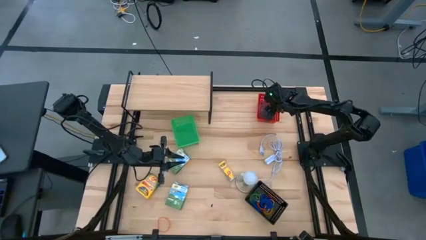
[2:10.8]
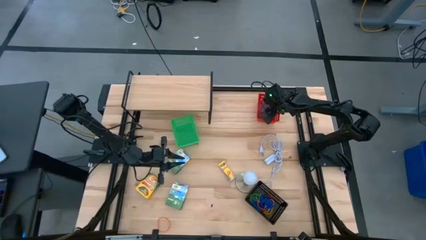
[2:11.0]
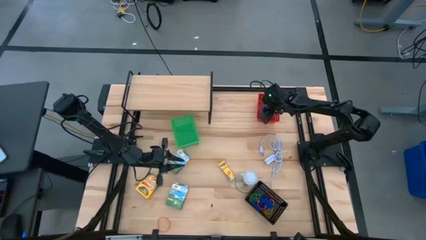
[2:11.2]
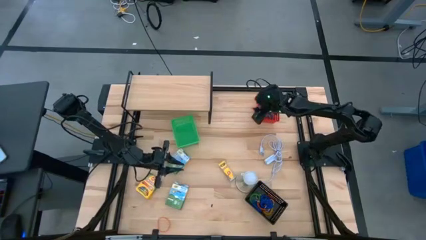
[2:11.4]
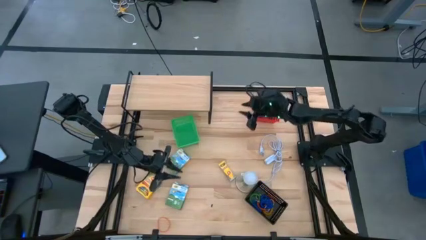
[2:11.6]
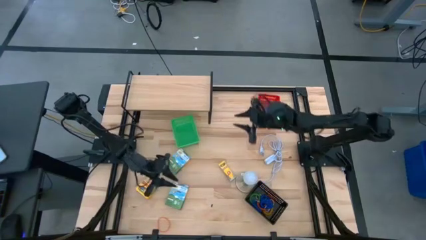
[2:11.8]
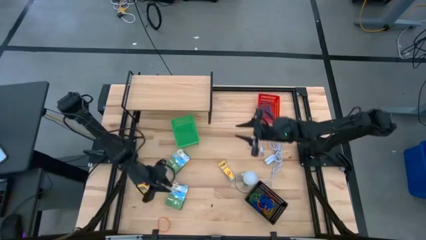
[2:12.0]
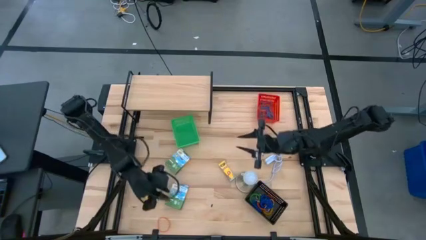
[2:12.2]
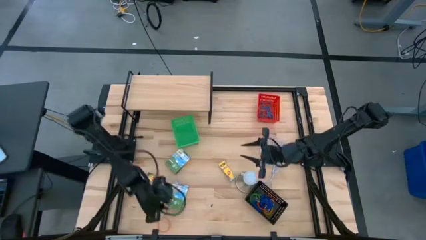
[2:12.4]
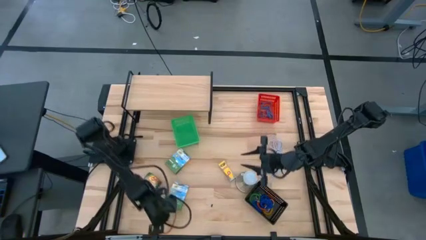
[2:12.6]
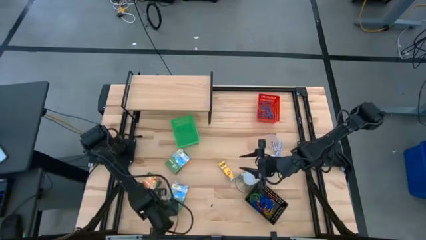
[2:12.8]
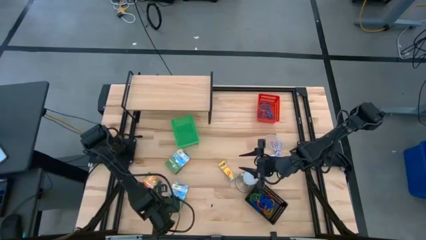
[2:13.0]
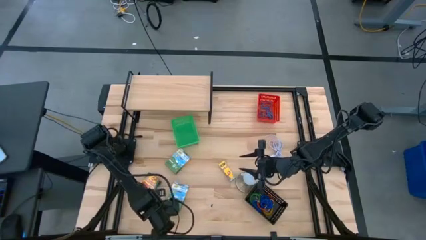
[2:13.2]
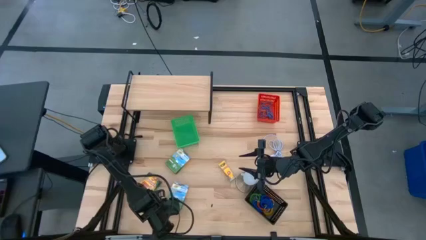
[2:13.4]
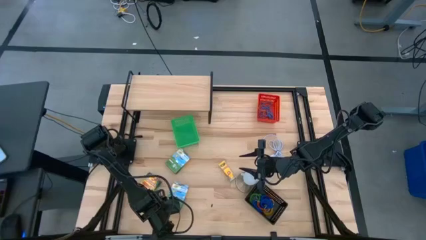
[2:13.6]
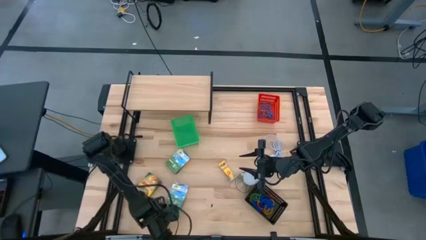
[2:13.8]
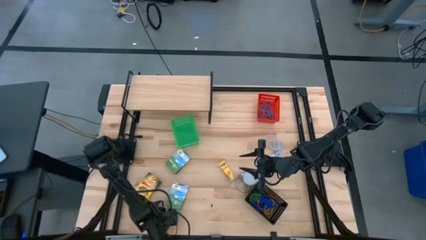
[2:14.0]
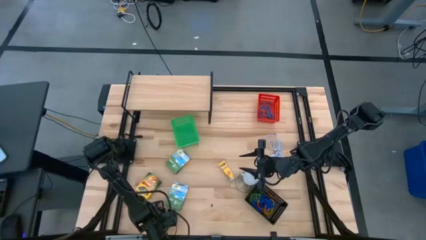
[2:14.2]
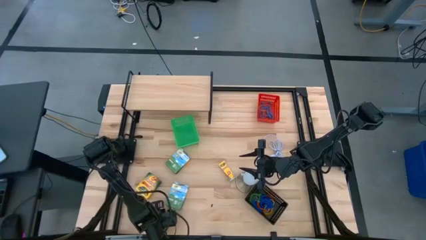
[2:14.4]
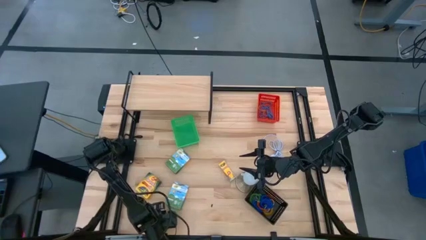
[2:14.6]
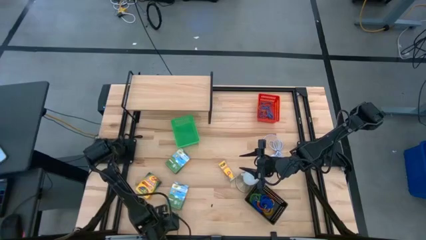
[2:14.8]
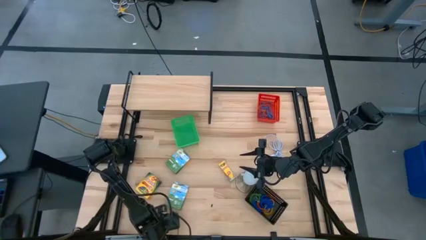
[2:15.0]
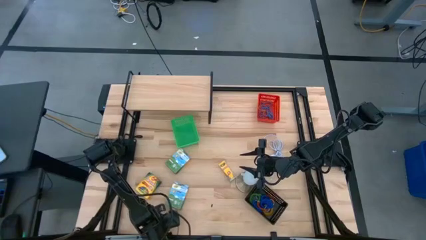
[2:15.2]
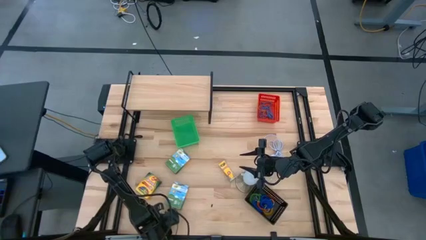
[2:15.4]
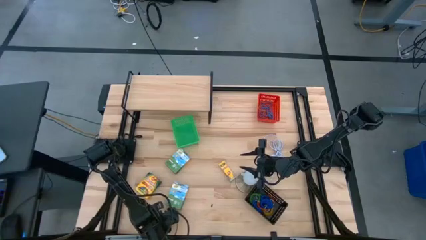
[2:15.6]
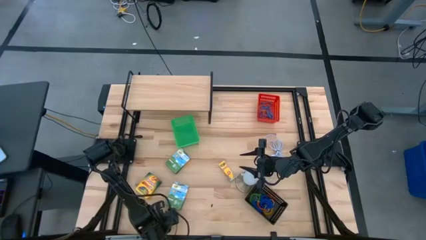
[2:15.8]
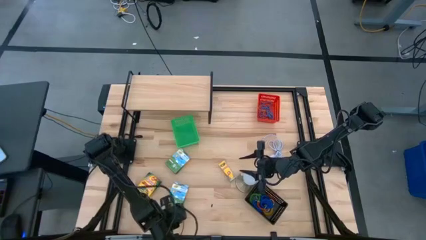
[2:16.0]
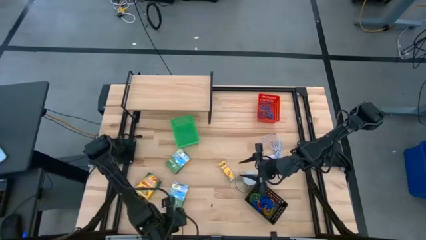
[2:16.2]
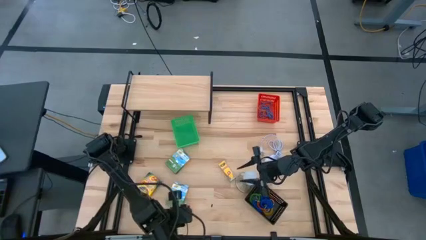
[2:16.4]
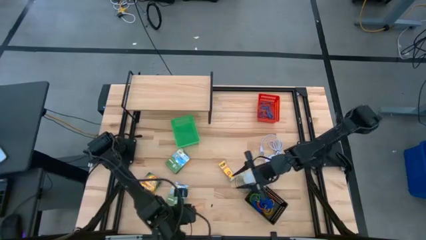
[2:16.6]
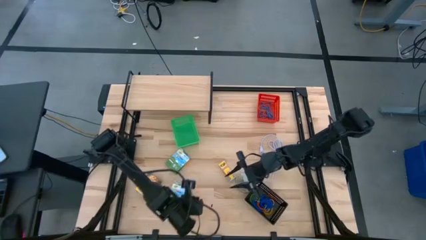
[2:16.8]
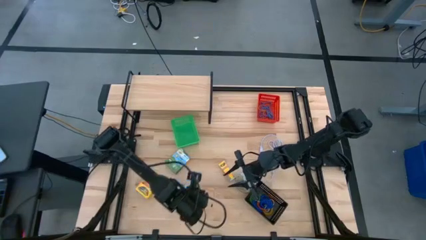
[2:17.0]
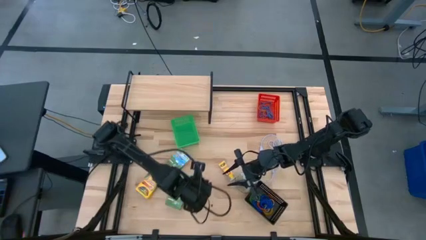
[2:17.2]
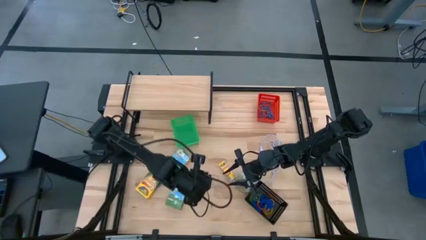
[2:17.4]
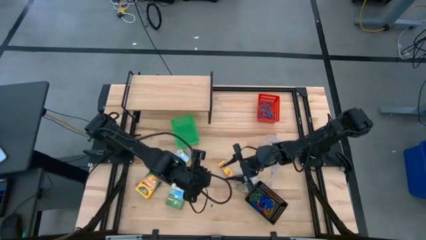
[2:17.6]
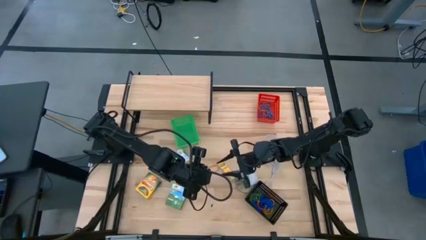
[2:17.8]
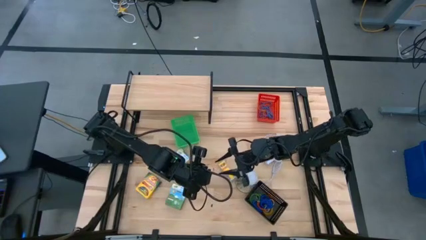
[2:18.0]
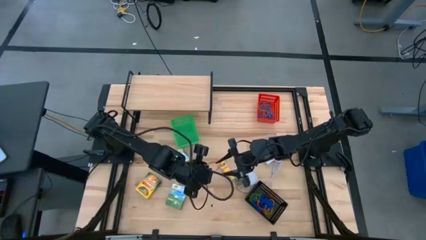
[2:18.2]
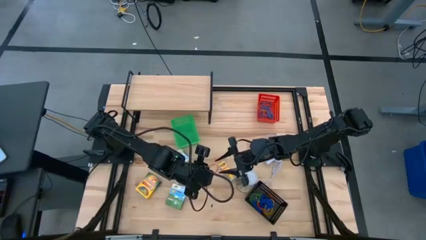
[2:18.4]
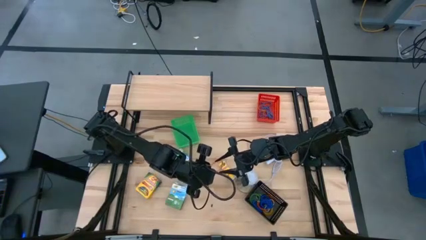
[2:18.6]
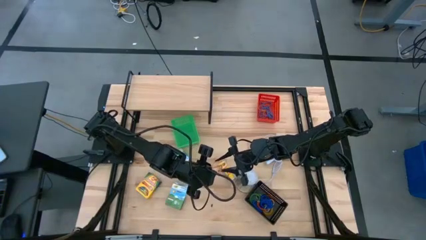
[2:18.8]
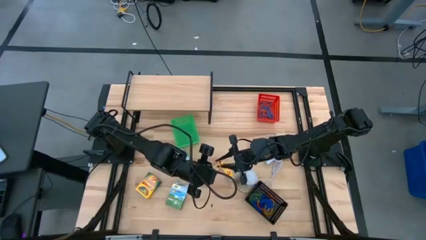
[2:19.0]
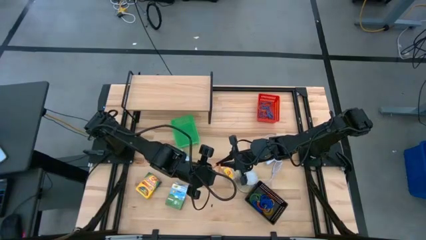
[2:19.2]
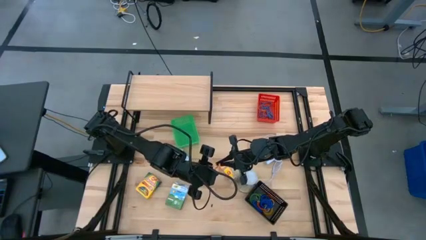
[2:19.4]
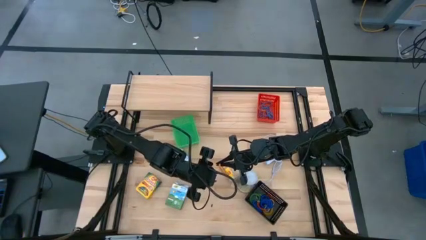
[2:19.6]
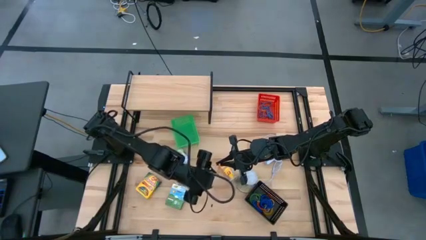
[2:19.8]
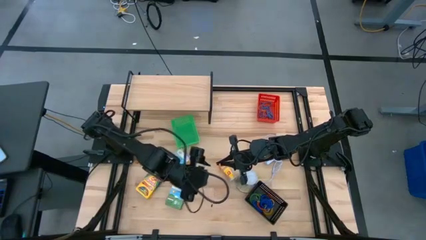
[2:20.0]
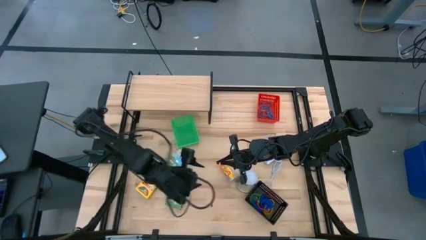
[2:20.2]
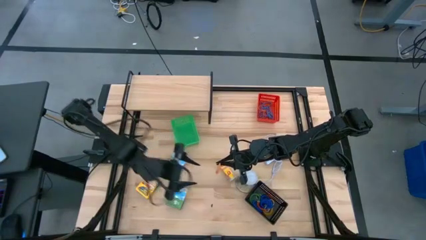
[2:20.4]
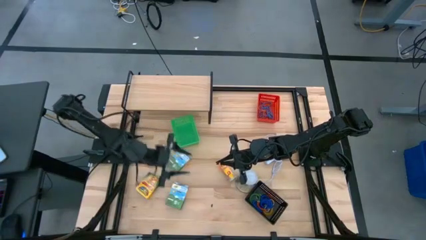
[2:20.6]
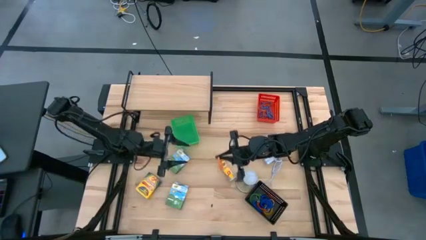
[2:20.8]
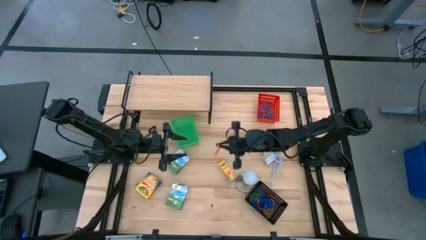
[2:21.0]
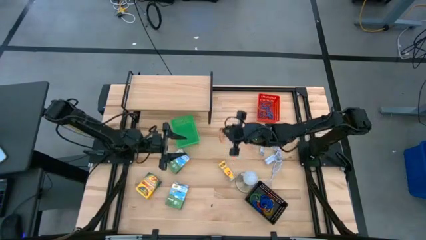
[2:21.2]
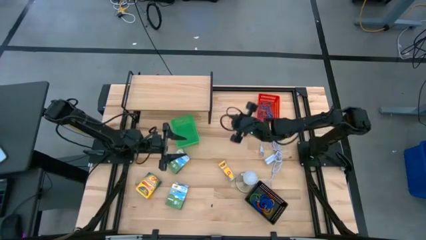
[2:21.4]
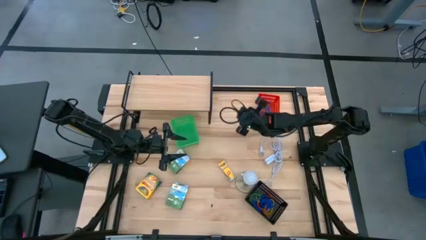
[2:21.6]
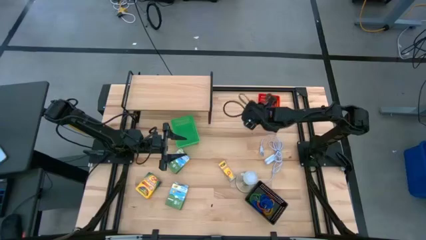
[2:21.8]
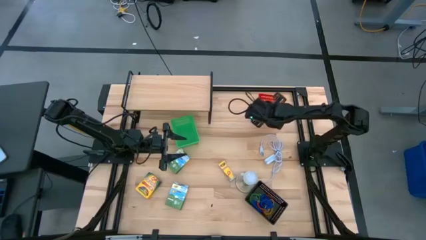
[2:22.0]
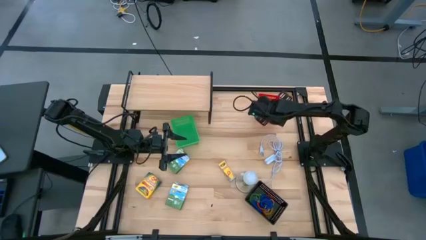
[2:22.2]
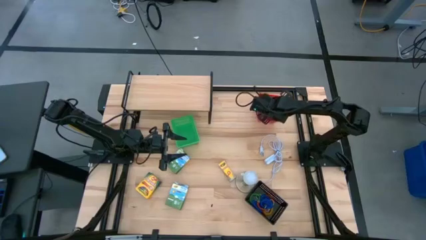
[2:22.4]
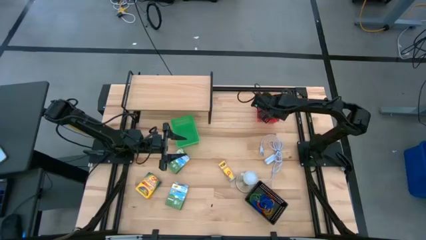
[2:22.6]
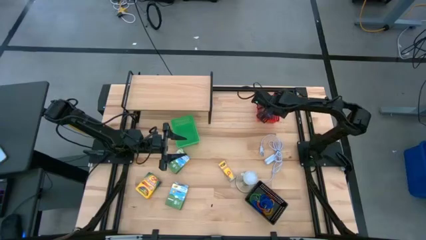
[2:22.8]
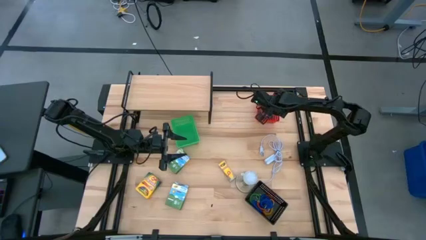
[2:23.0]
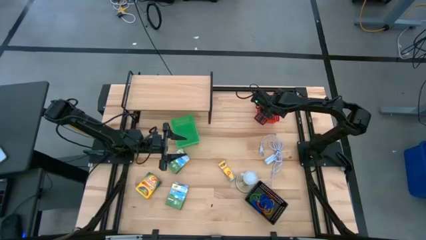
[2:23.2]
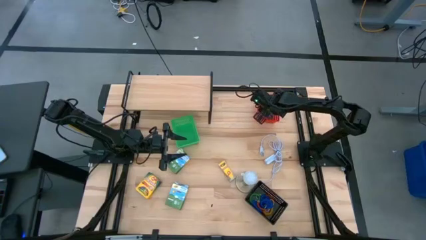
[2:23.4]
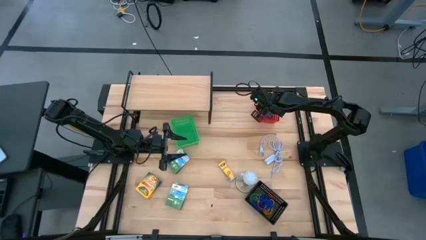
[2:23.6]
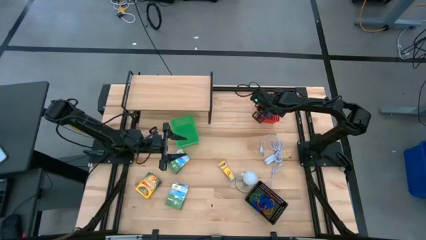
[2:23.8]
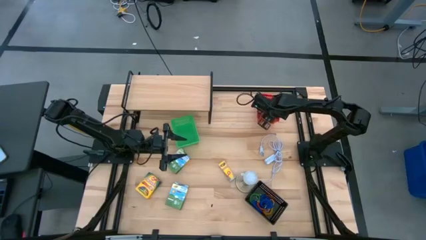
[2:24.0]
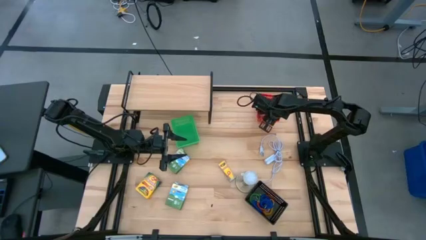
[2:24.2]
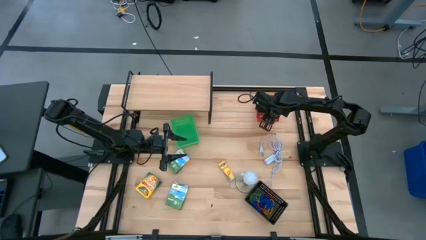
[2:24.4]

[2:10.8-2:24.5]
Task: Pick & Place Office Desk Supplies
Put the orange rubber band into the red basket
